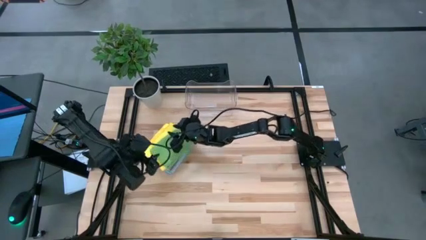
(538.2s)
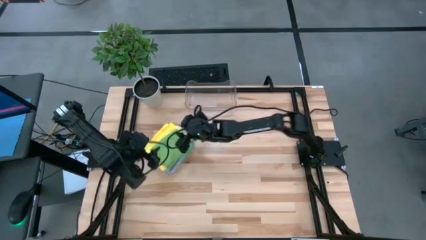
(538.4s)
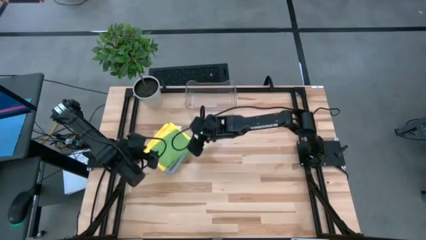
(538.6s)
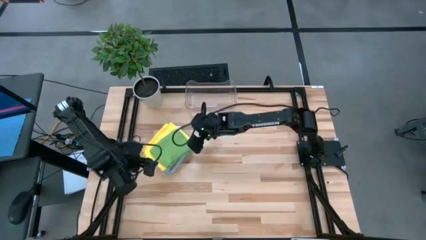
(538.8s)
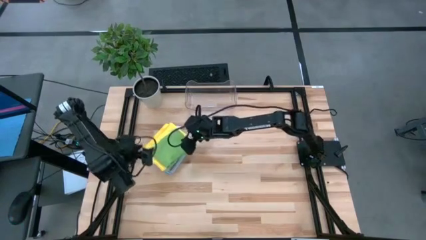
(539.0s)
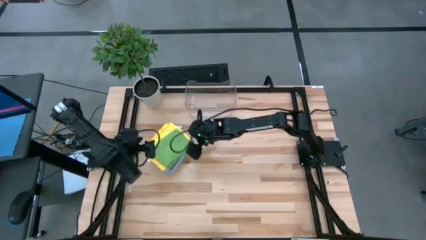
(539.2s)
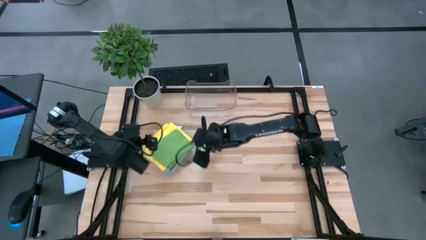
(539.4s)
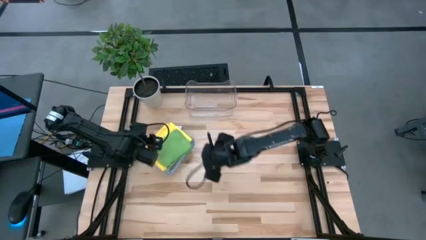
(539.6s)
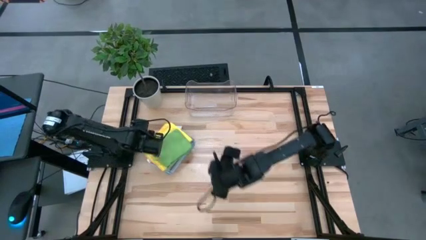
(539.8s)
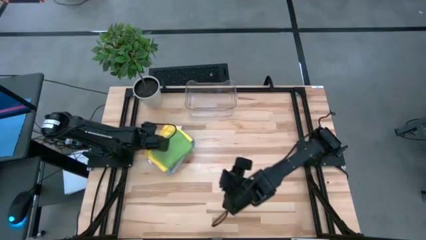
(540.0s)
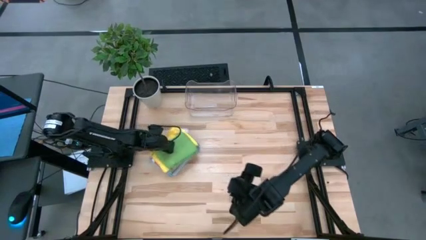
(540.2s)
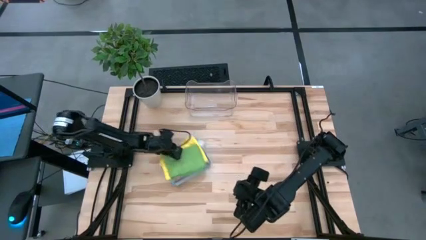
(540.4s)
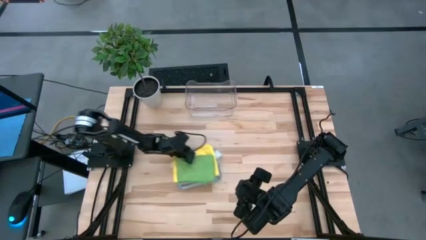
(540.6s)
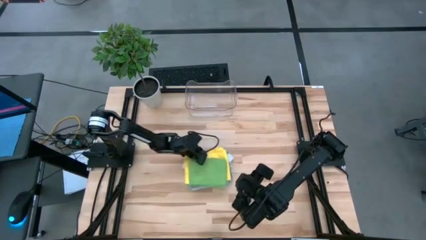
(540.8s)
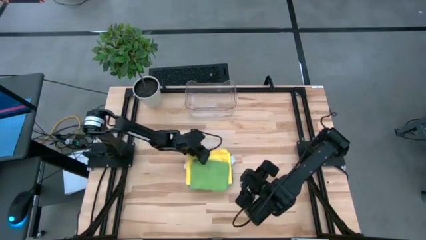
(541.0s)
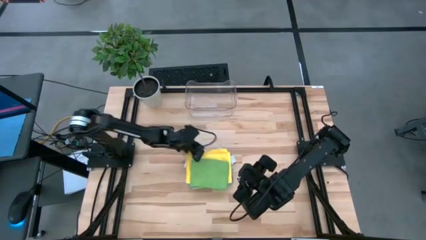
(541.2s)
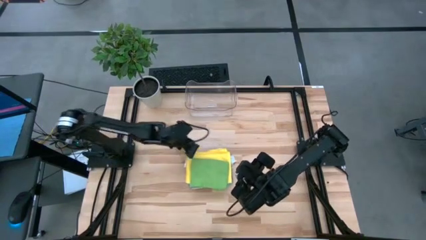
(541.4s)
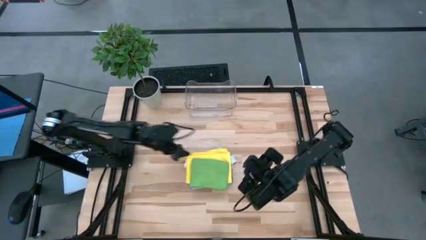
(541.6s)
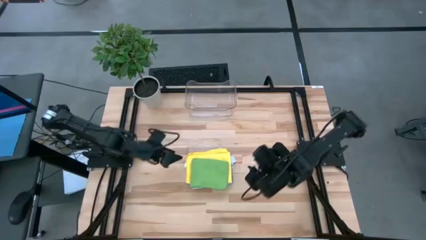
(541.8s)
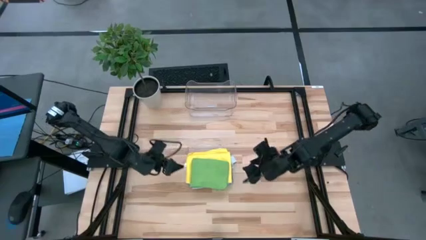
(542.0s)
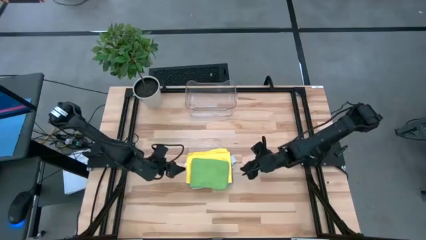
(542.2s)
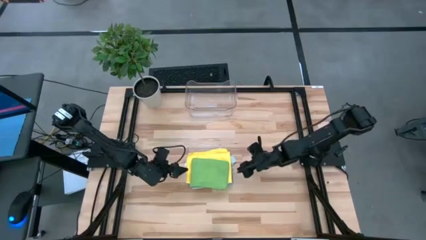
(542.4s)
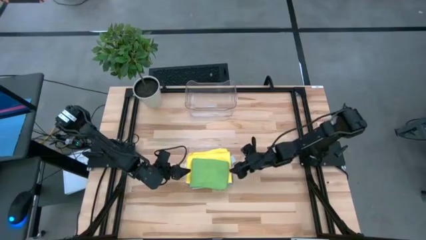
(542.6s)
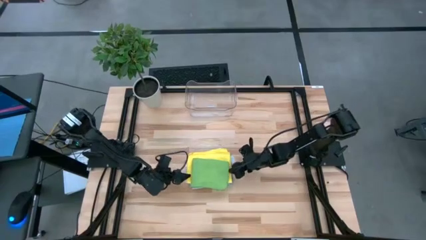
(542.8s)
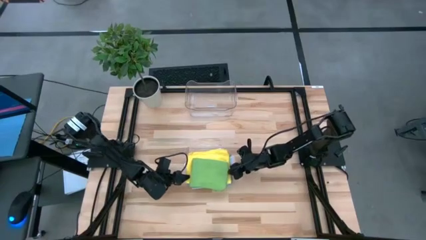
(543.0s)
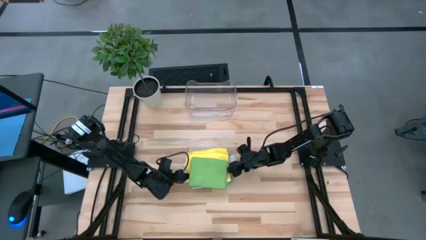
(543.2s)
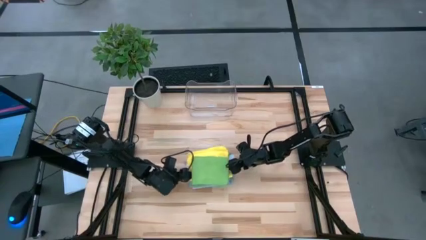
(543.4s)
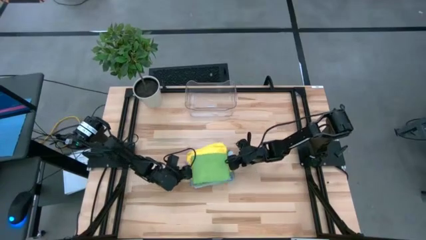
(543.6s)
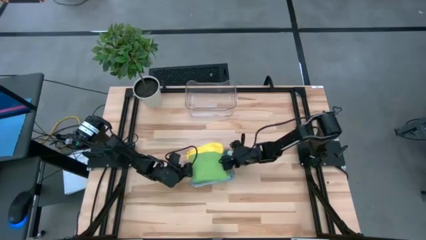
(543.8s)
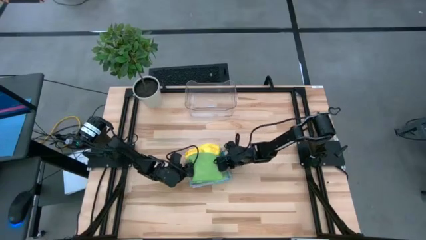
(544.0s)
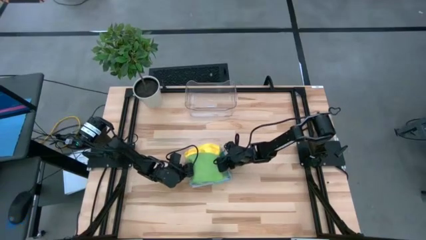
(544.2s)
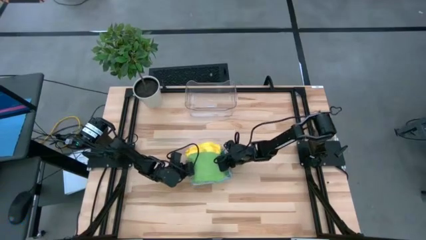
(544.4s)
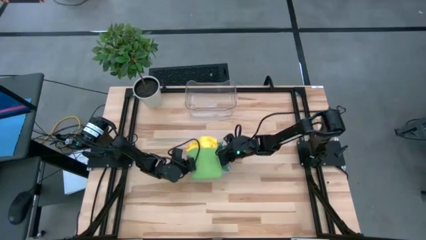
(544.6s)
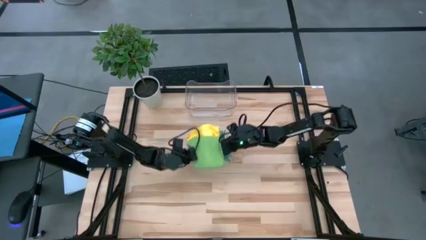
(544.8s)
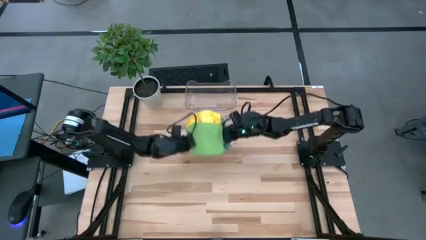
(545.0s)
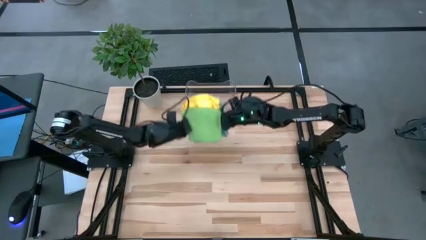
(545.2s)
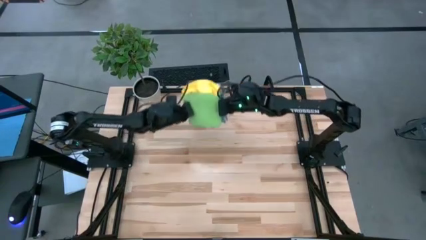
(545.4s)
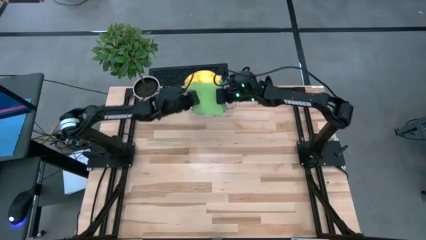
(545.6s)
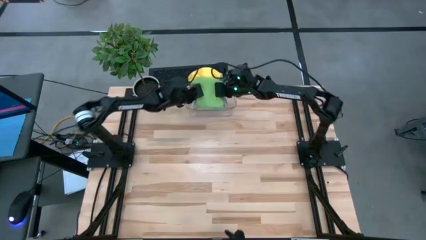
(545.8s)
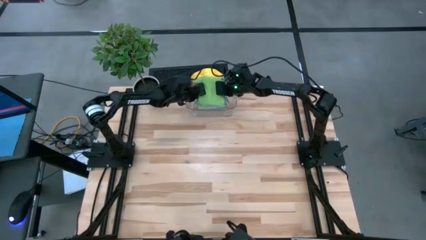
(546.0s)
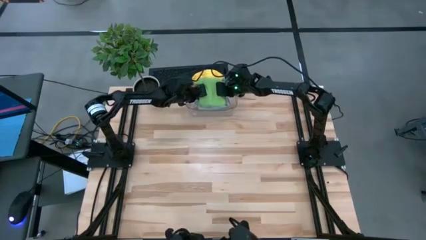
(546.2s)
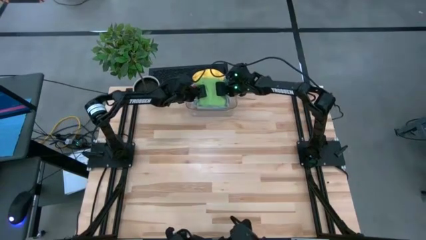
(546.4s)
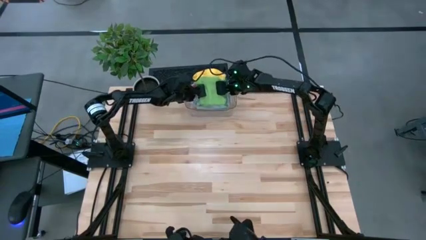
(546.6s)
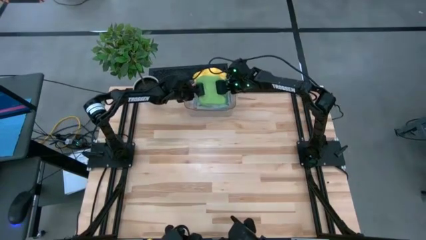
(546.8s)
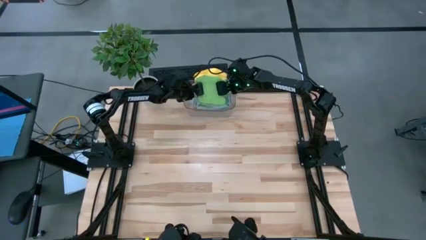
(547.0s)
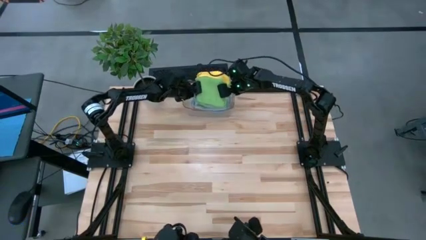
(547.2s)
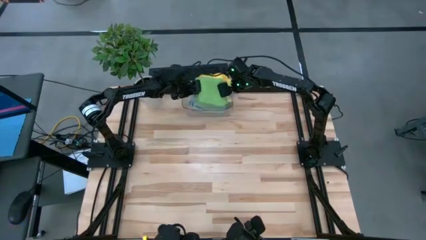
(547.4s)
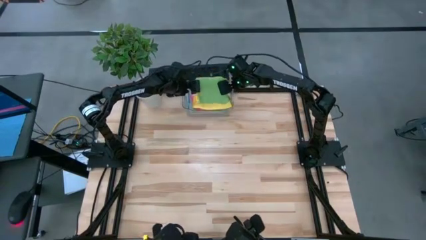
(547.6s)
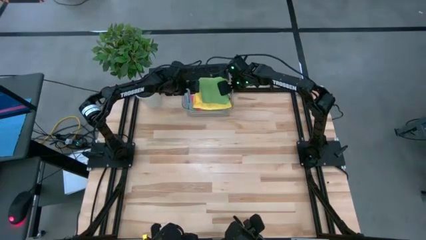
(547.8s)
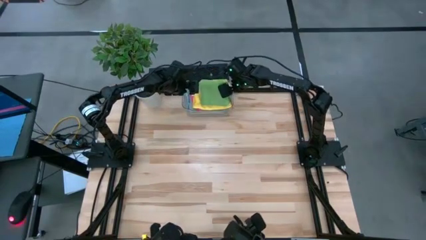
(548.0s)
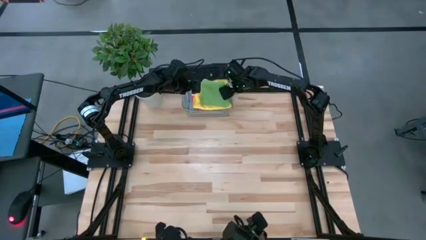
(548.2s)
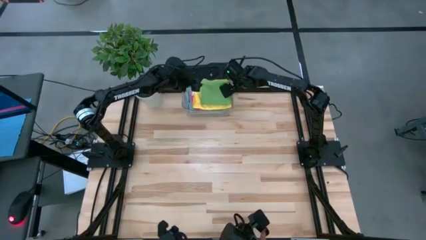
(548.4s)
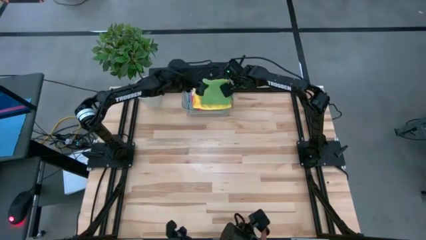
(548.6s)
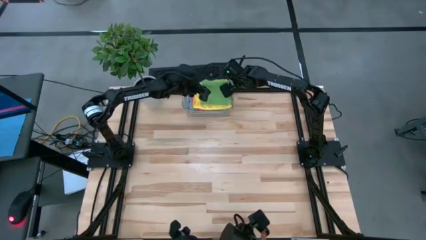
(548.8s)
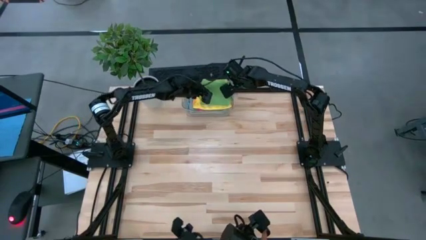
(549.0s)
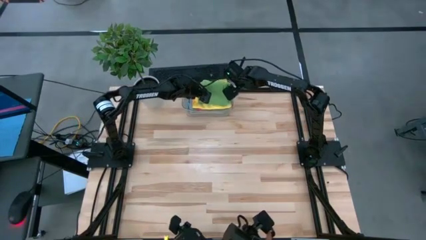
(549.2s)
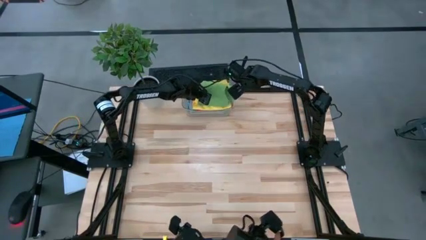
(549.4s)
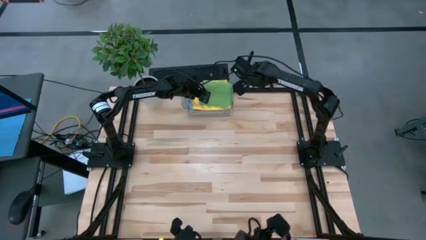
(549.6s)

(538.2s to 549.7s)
Task: Fold microfiber towels
Put the stacked folded microfiber cloths into the transparent bin

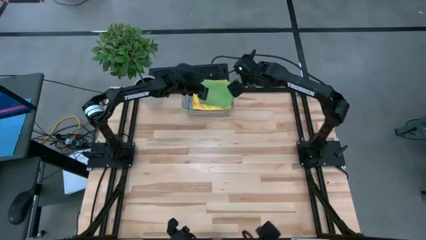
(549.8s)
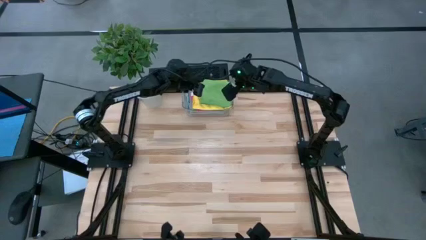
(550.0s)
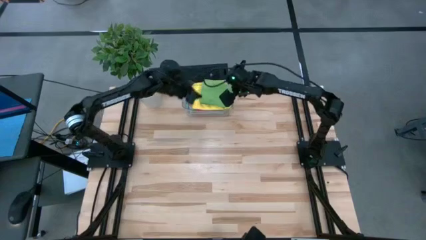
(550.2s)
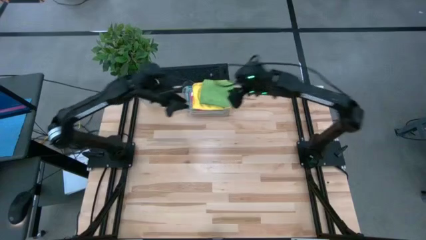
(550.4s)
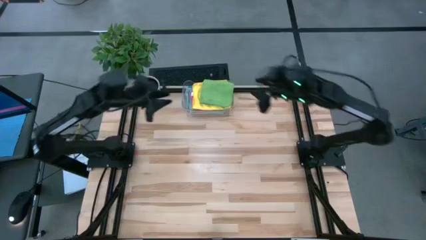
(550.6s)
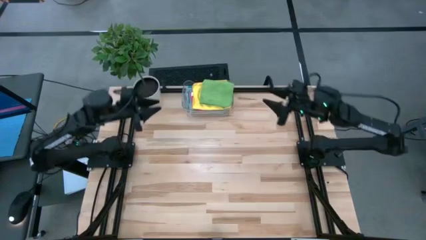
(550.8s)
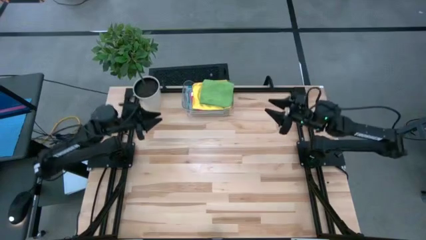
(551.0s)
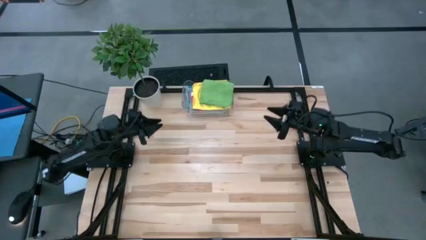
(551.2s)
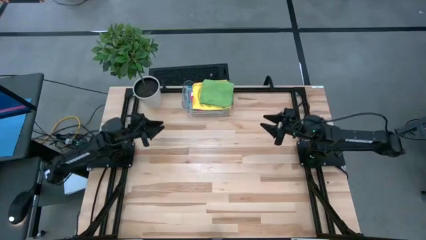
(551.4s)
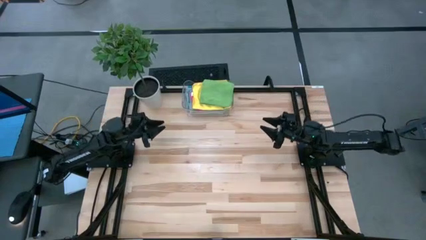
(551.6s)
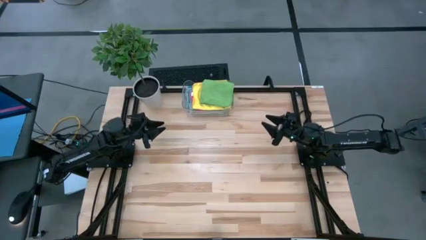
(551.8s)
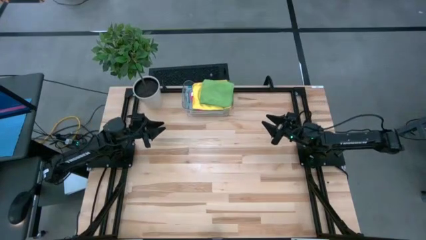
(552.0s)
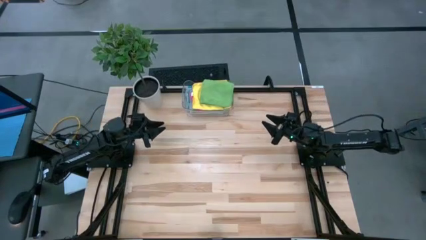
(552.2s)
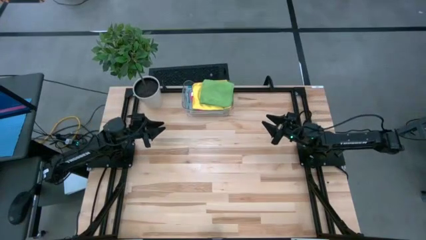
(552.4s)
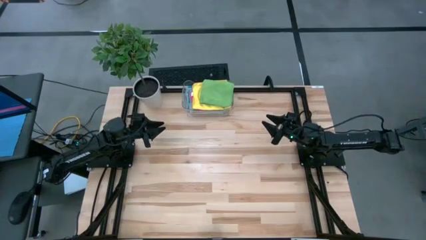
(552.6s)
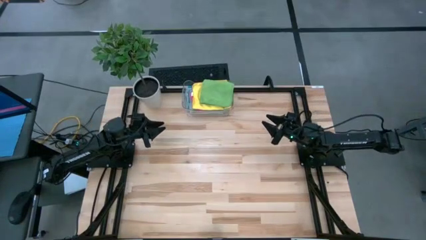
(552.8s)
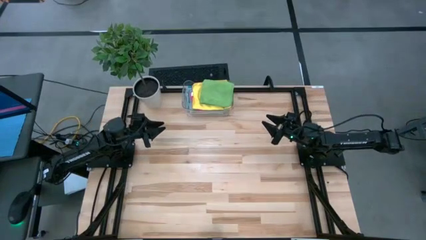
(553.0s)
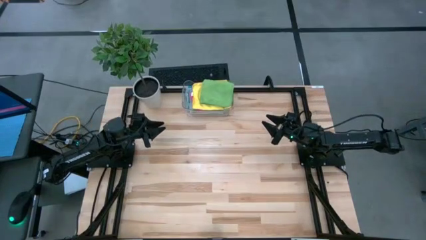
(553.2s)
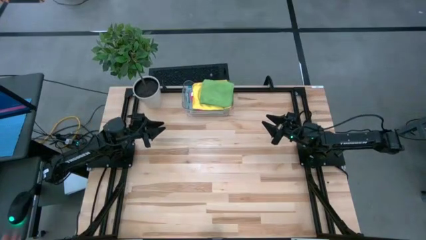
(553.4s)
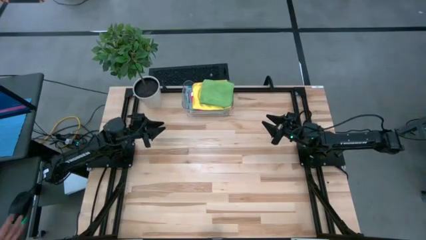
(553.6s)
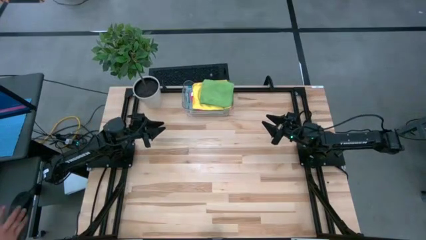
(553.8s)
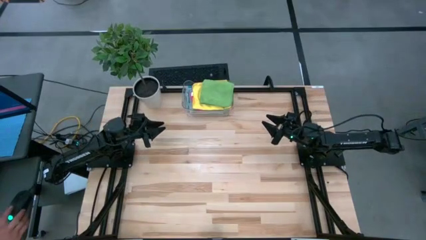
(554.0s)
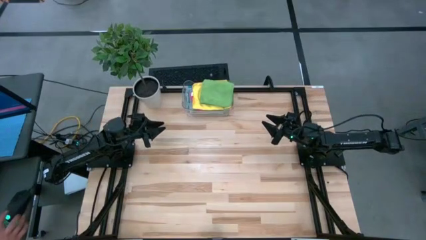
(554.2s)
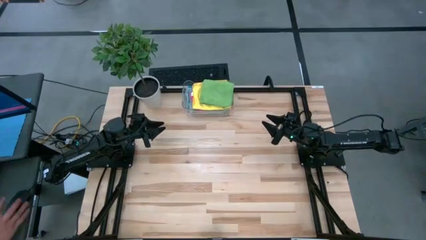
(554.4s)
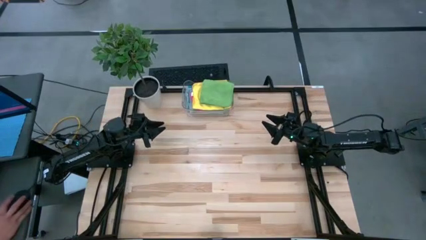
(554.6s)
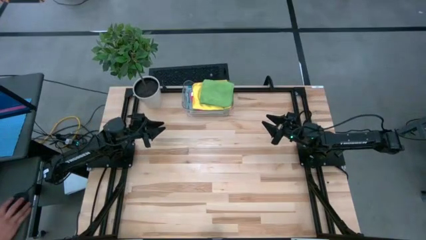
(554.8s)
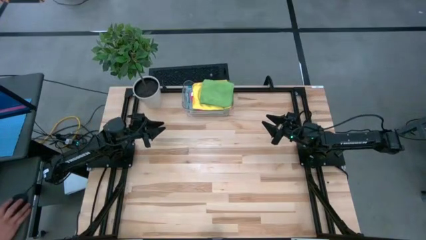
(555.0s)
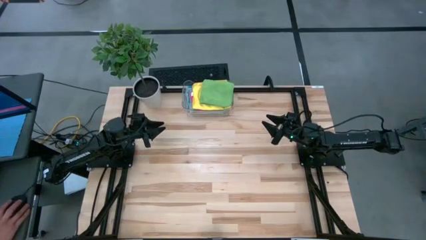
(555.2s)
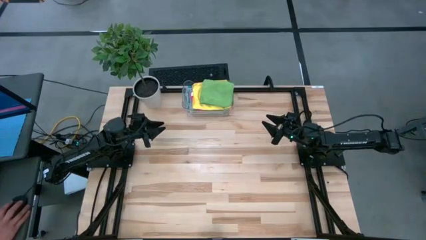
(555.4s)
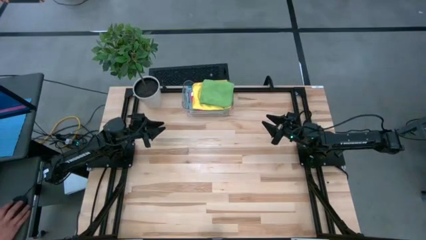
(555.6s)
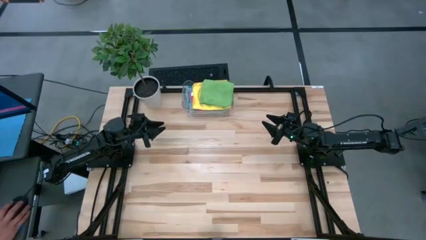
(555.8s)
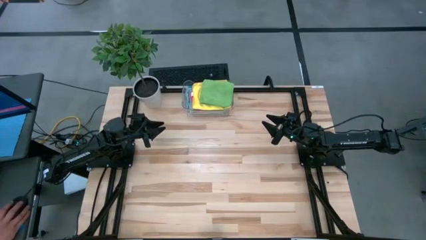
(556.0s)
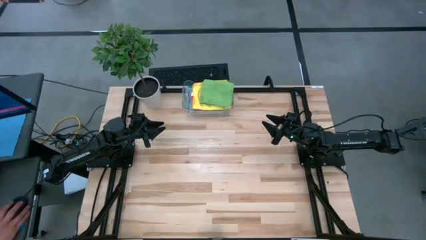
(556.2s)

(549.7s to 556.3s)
Return to Home Position
